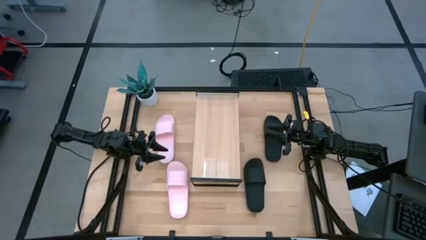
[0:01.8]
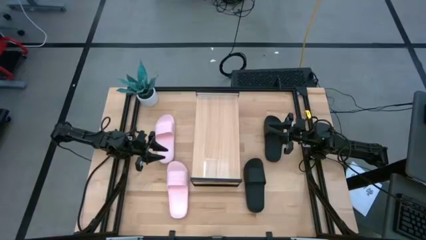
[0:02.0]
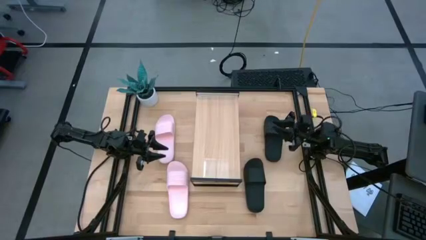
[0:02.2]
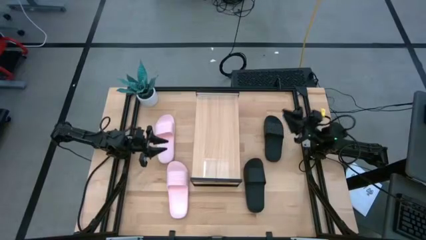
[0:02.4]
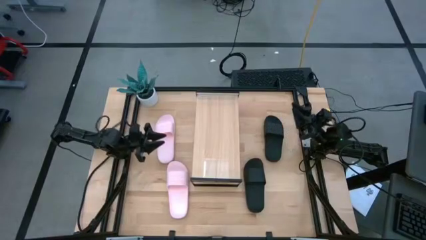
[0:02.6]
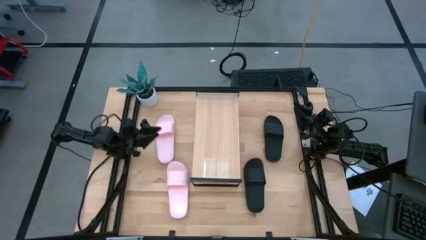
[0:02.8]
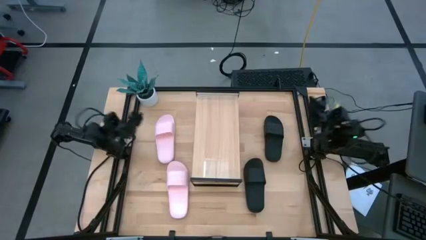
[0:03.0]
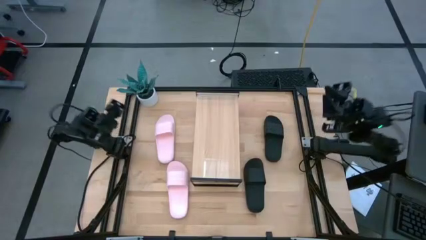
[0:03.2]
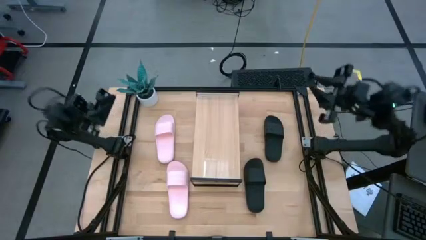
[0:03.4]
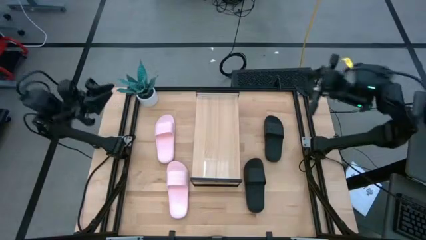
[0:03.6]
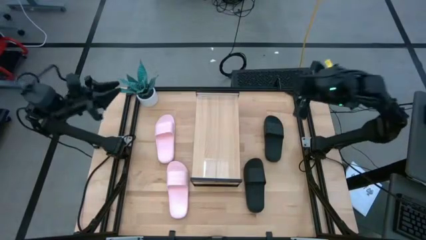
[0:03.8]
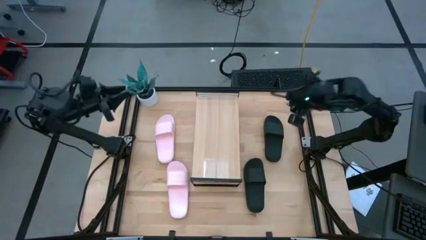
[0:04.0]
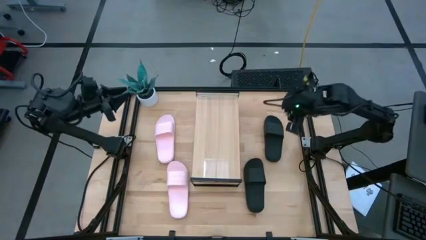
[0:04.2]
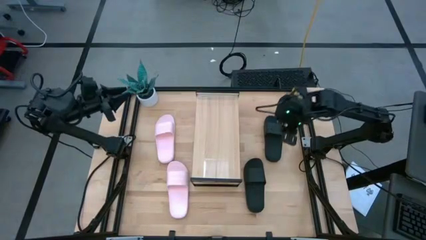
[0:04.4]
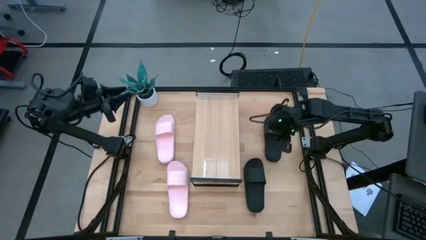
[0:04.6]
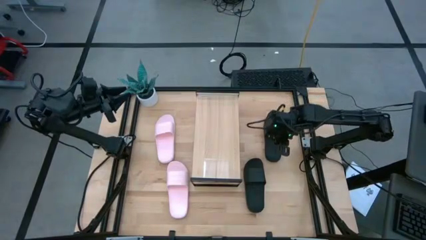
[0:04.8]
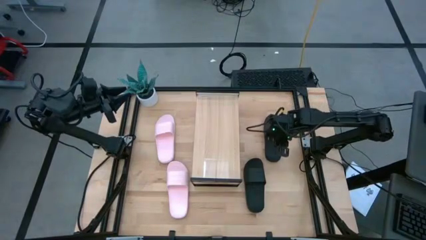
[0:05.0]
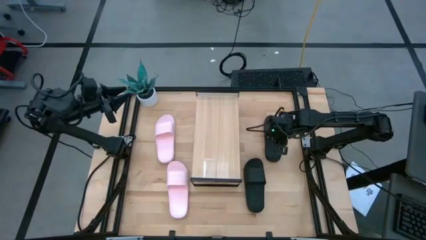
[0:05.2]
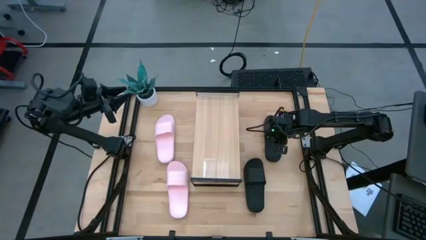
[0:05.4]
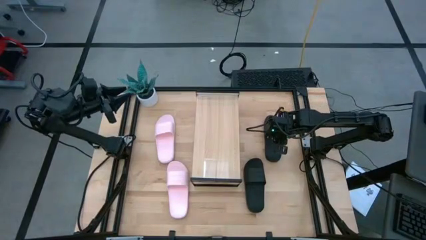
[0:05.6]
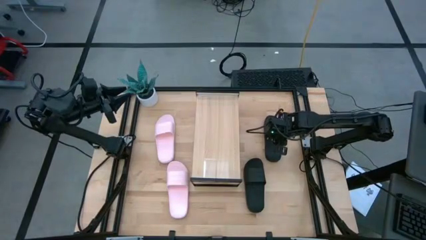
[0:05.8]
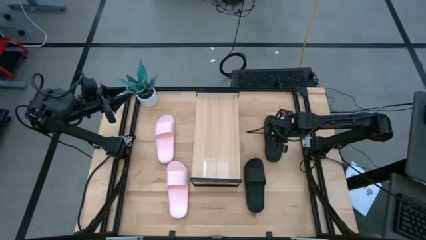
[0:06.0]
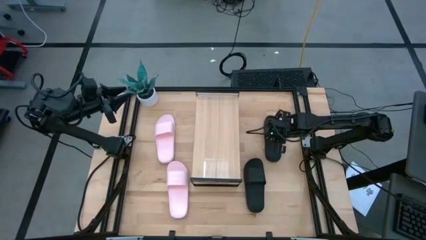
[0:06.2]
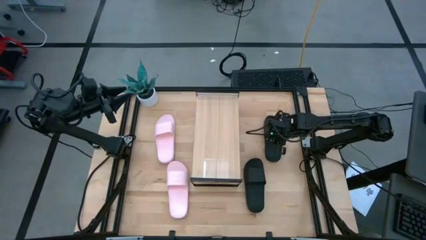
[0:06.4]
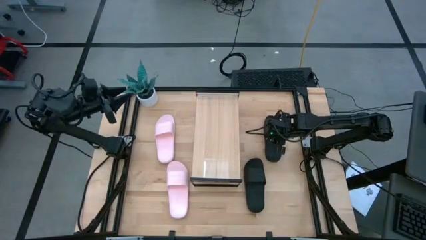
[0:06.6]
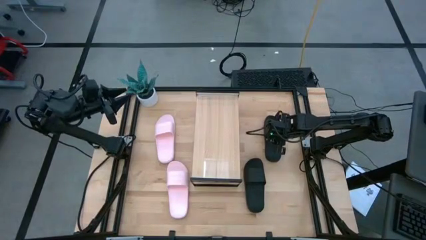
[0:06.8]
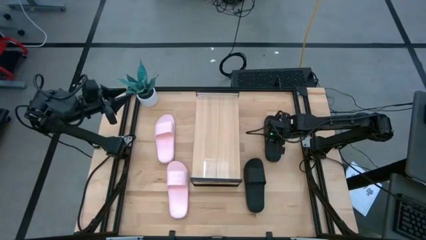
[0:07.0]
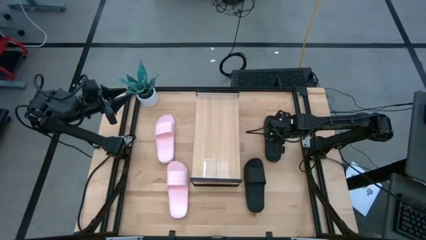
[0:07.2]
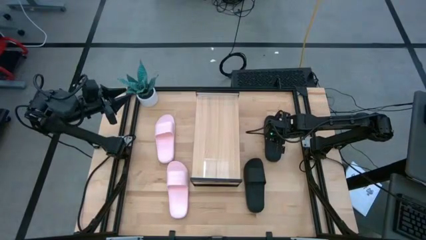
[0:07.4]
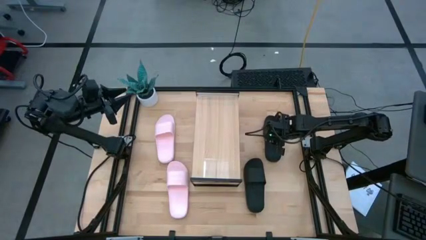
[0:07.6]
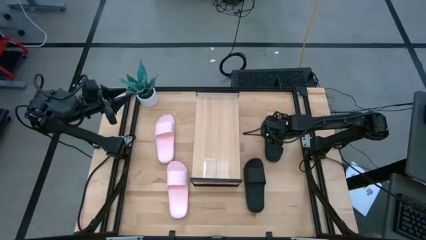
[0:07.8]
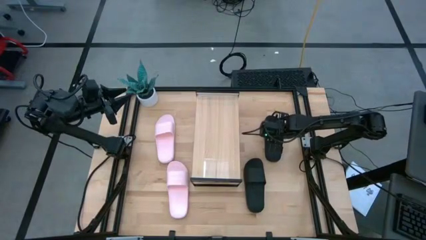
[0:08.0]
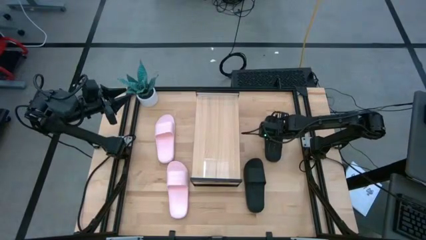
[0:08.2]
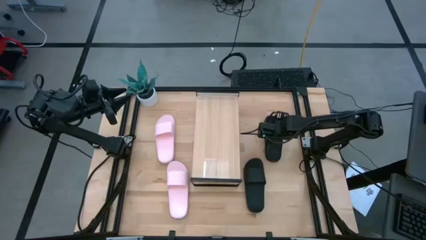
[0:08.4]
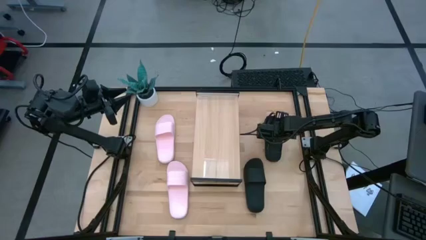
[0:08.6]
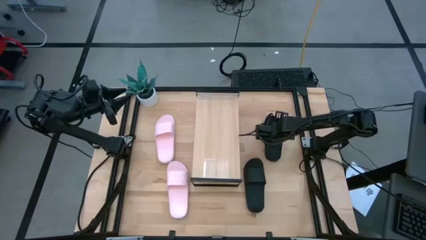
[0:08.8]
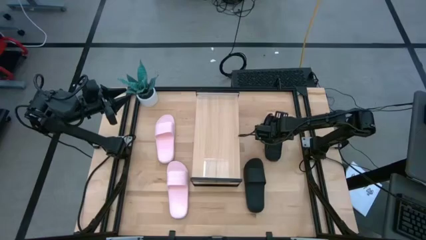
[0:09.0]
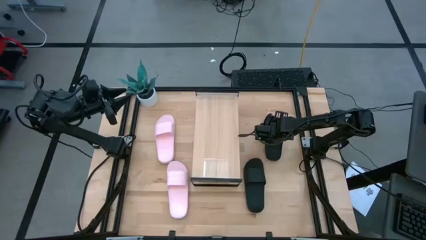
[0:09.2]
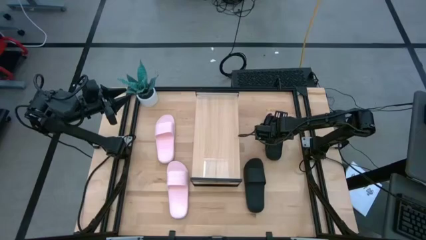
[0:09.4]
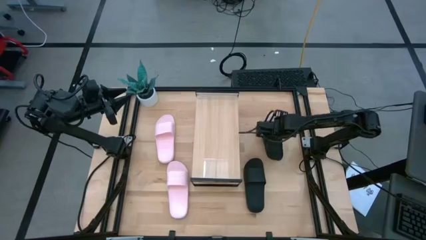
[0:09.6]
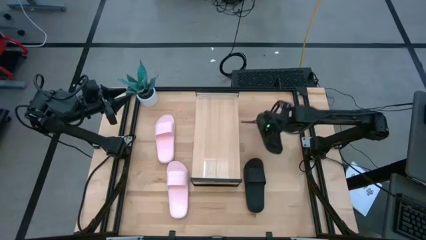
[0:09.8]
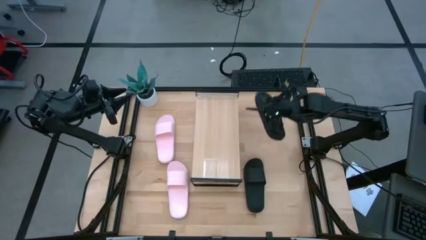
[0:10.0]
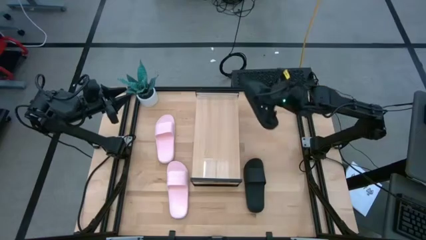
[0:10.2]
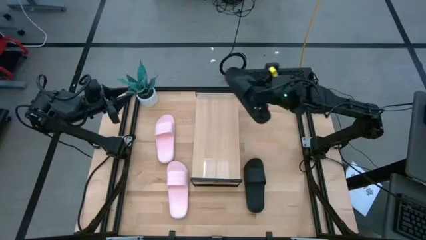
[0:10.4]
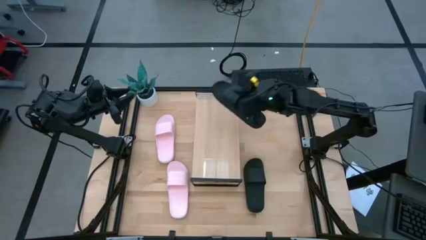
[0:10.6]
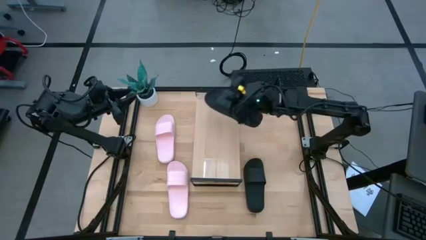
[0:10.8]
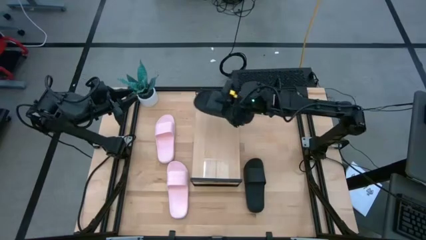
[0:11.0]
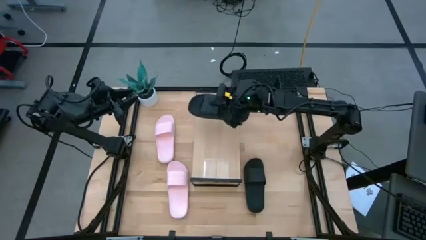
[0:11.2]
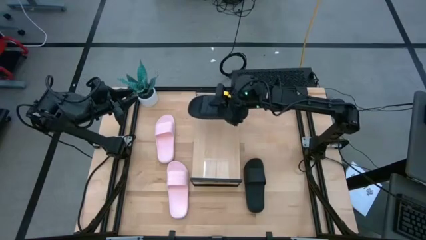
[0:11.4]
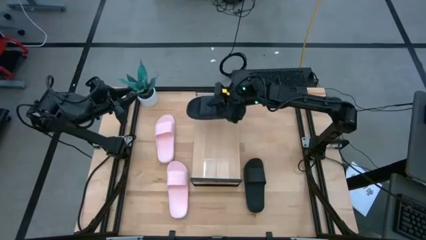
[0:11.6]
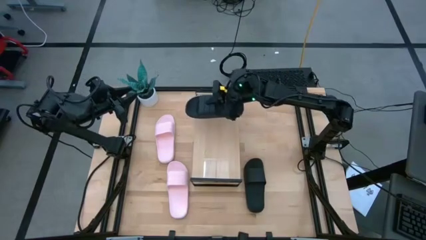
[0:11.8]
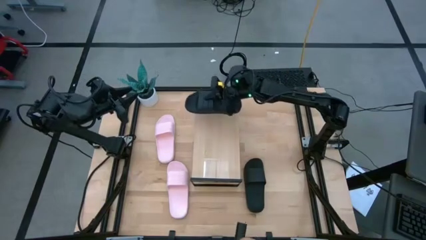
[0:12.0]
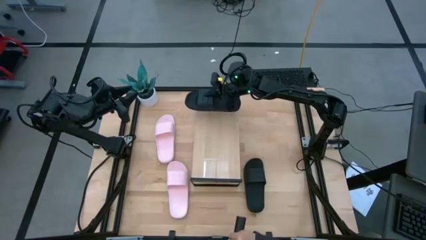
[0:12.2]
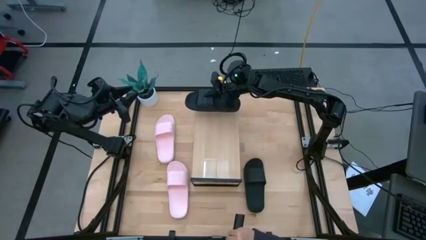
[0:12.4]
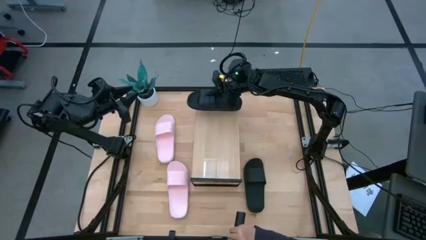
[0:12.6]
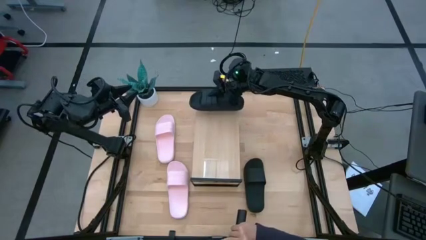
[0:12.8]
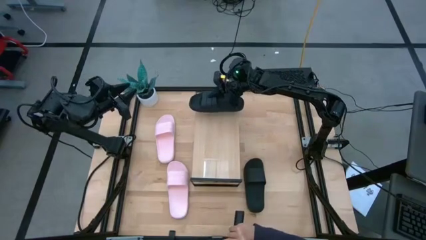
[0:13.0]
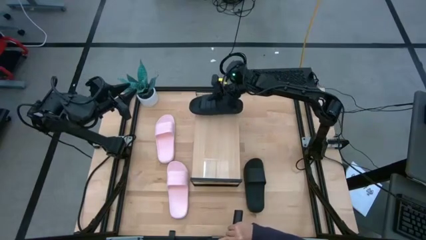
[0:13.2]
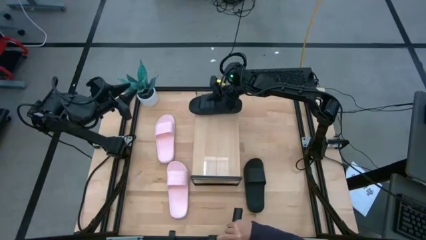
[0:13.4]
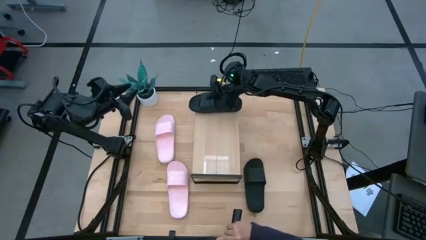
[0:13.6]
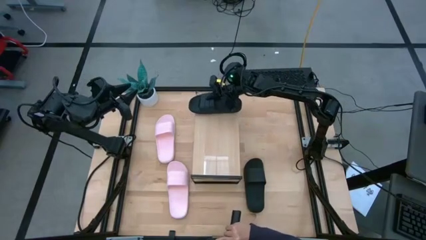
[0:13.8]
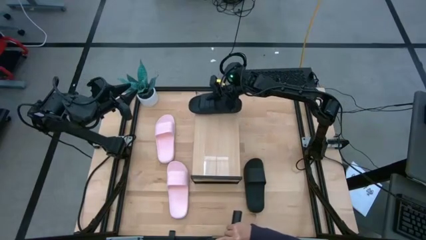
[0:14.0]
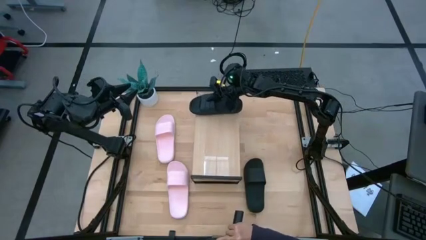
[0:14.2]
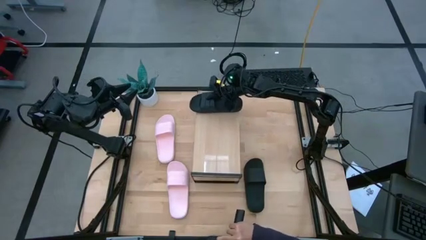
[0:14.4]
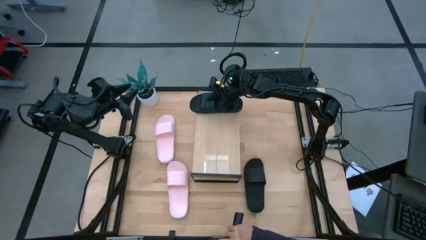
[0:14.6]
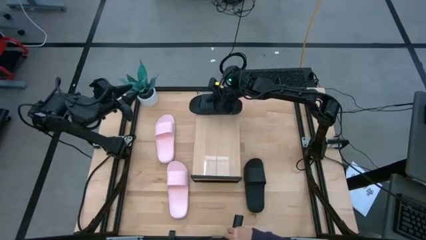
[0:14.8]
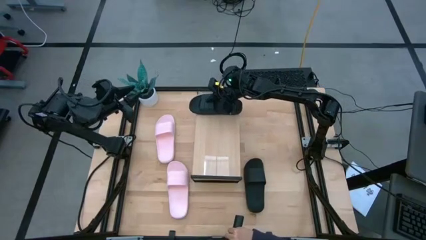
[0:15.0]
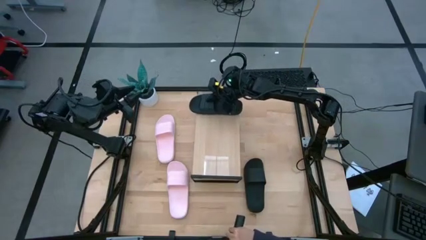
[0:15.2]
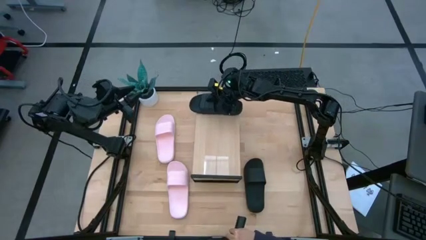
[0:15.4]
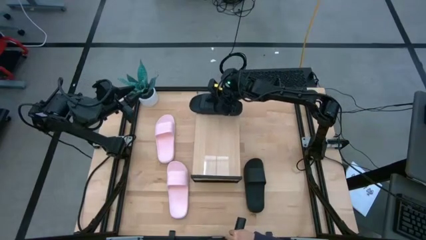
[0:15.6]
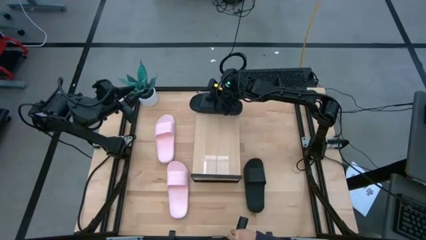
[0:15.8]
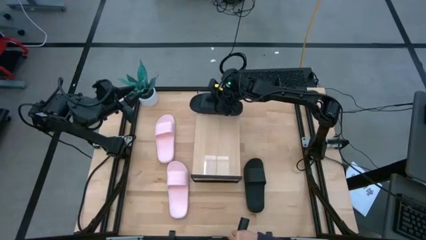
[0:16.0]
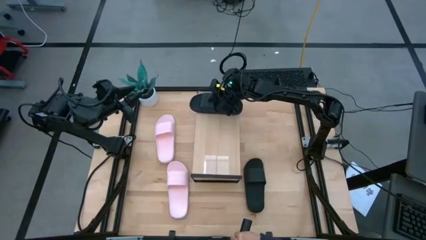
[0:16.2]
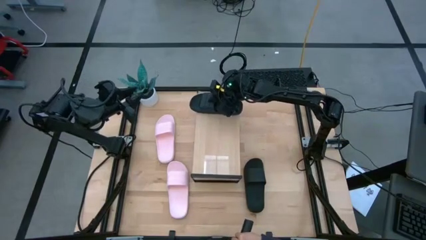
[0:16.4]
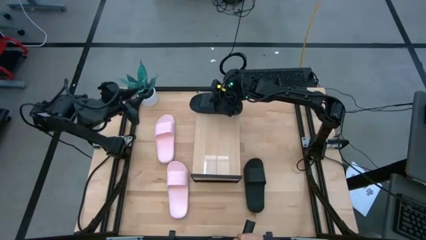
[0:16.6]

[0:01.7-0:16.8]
Task: Pick and place slides into the shelf
Put the top black slides on the shelf
